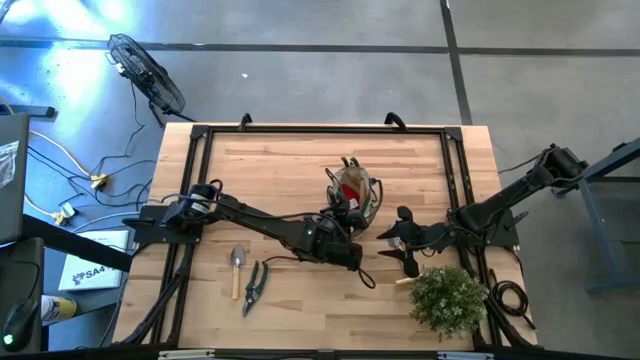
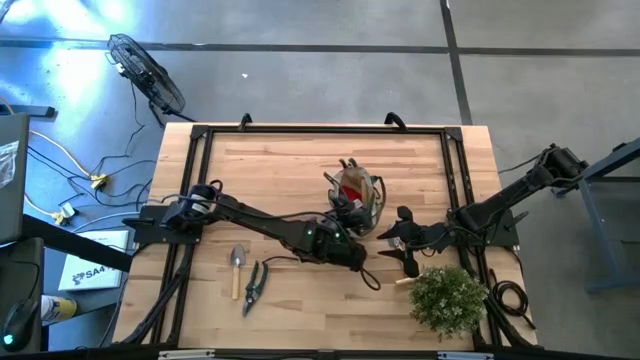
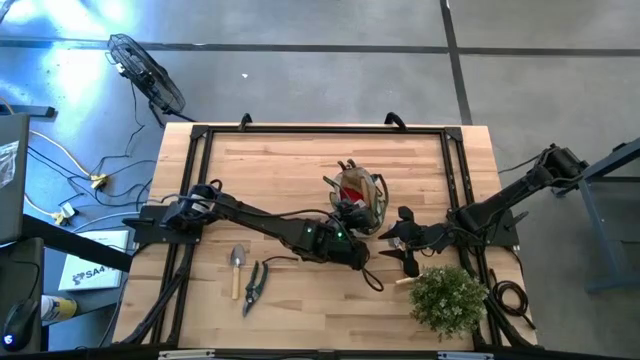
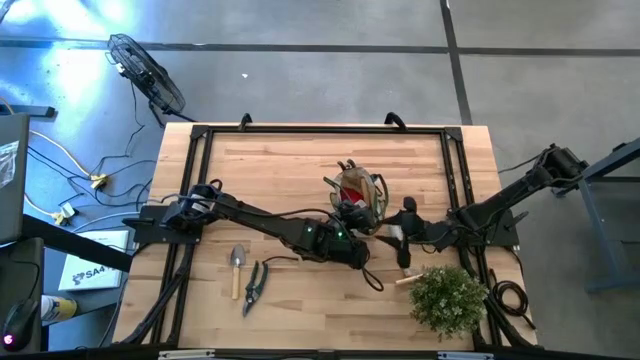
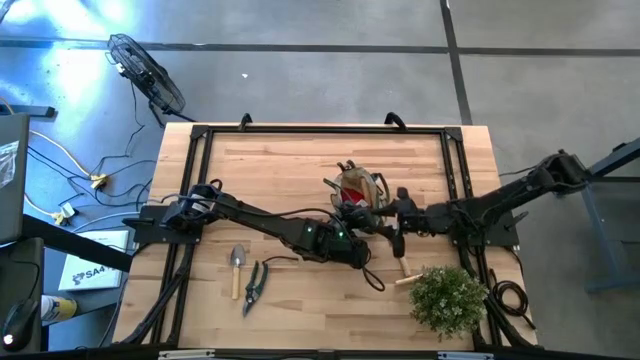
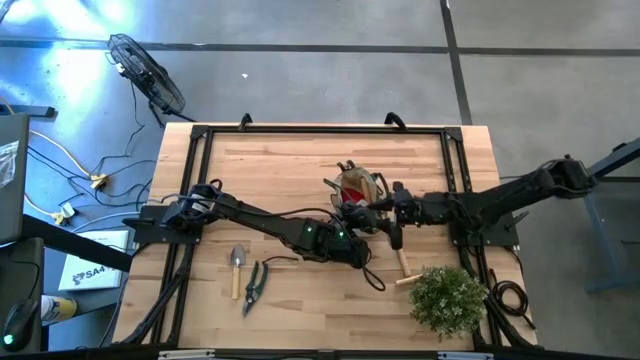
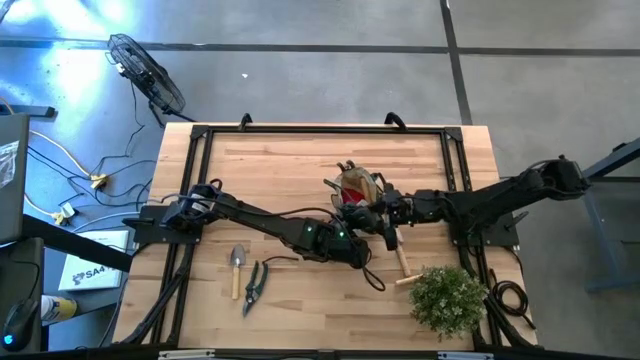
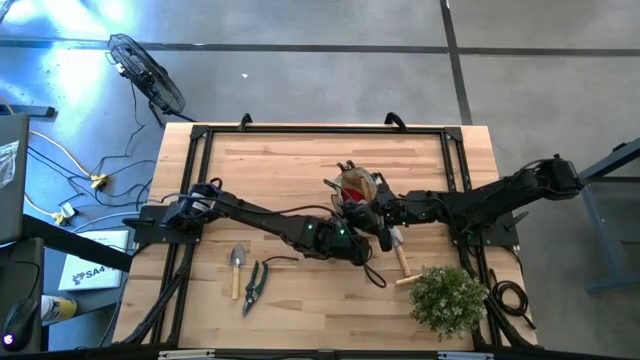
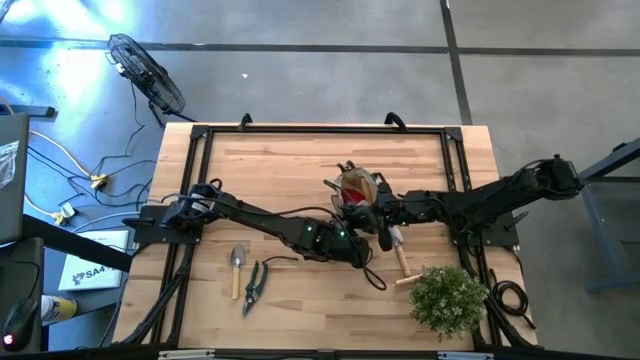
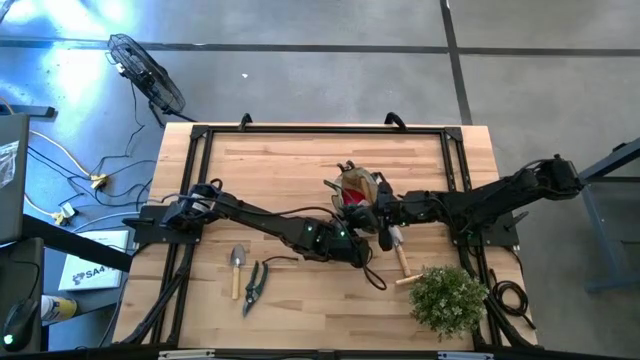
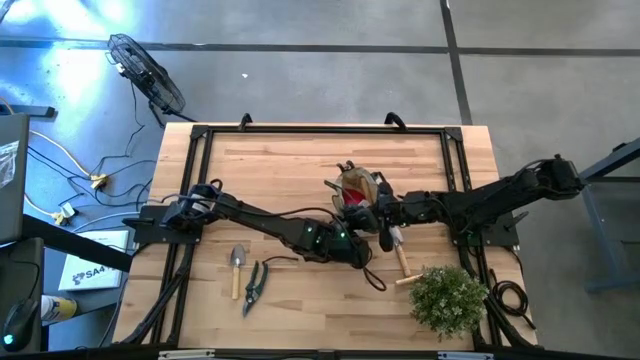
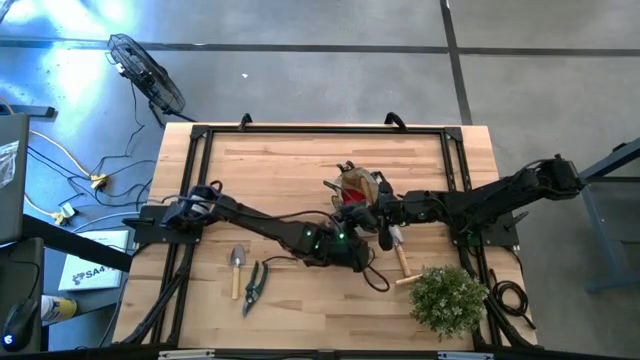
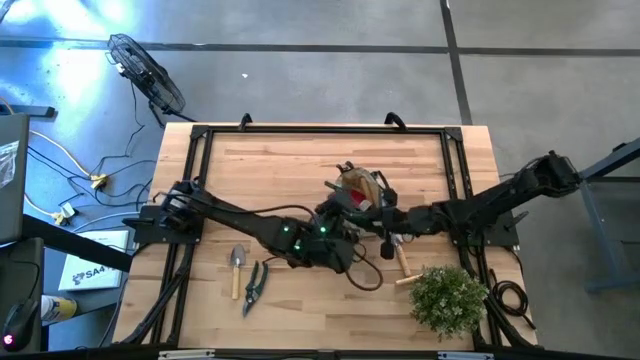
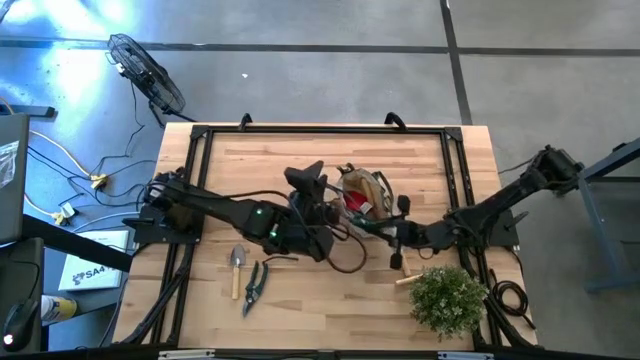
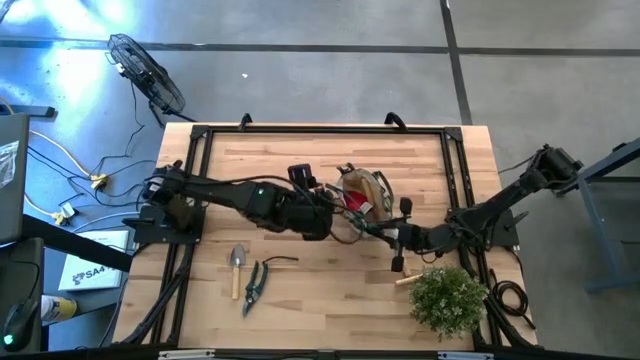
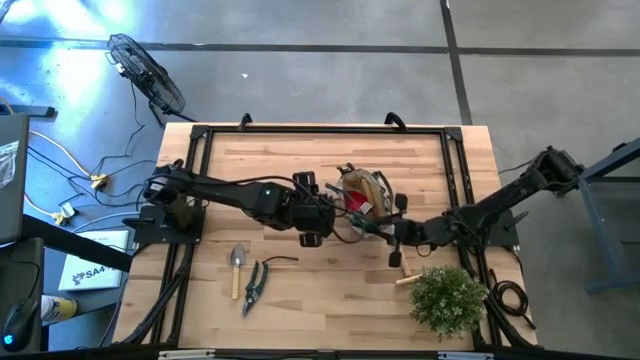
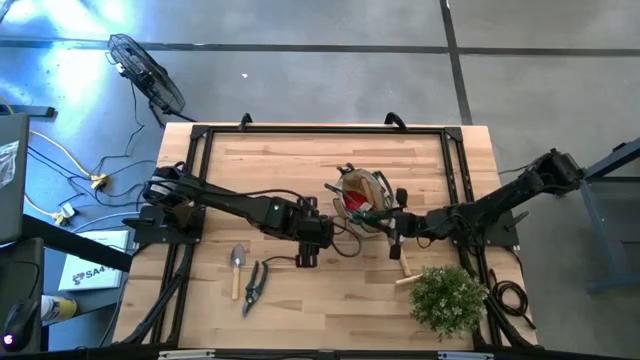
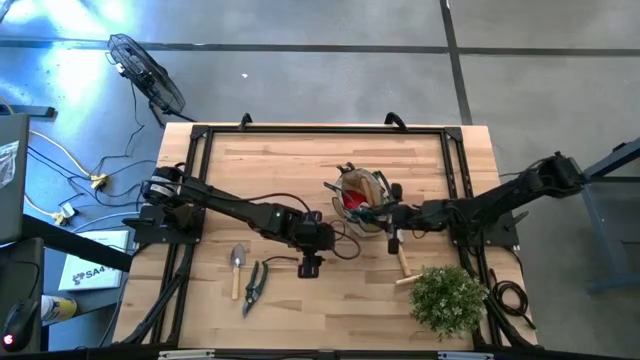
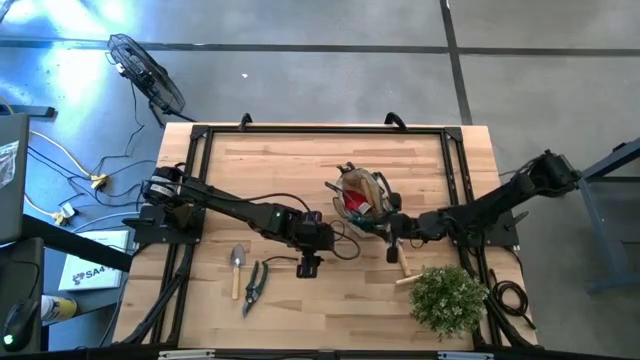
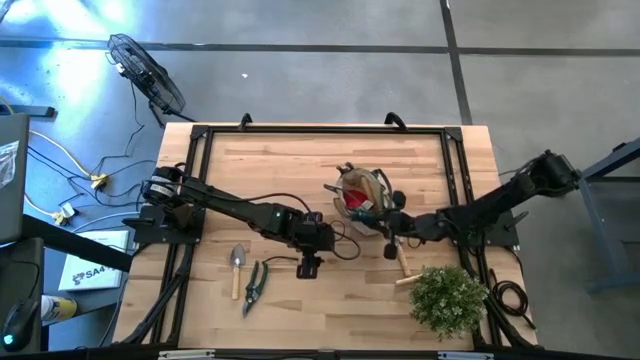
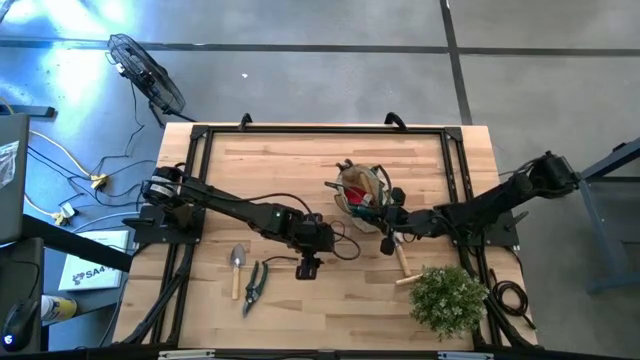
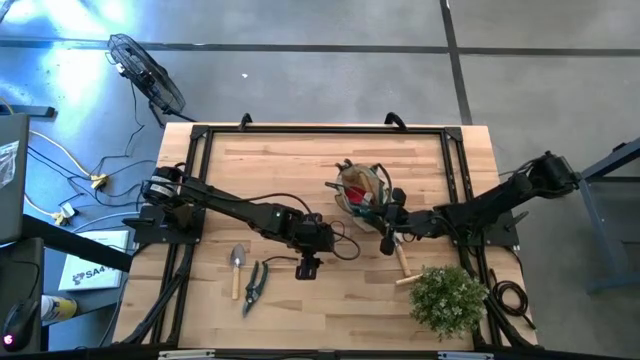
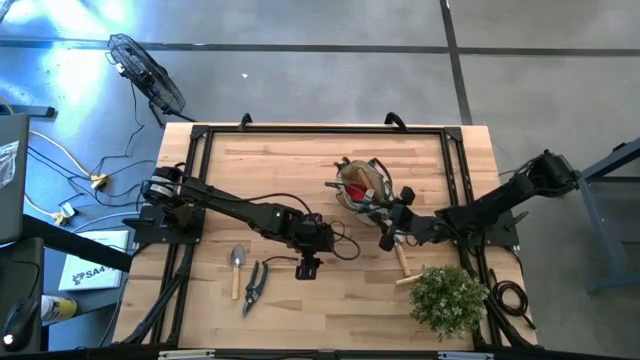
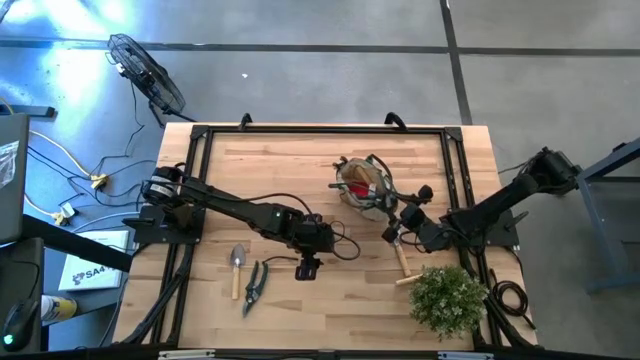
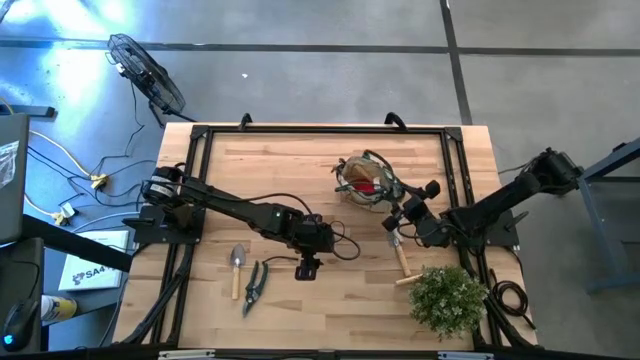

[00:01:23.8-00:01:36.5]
Task: Pick & Place Garden tools in Gardening bag
Put the top green shear scissors into the light brown gardening bag

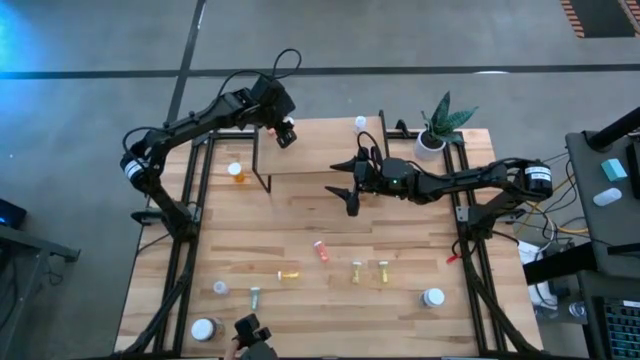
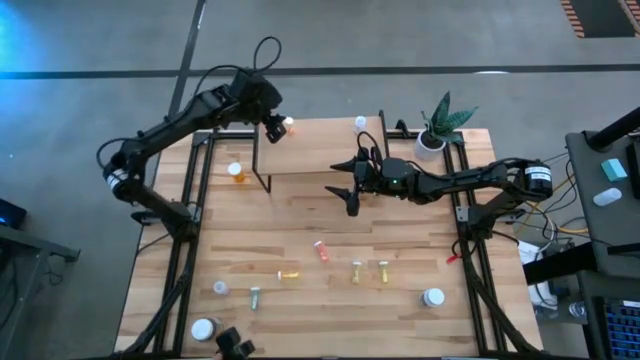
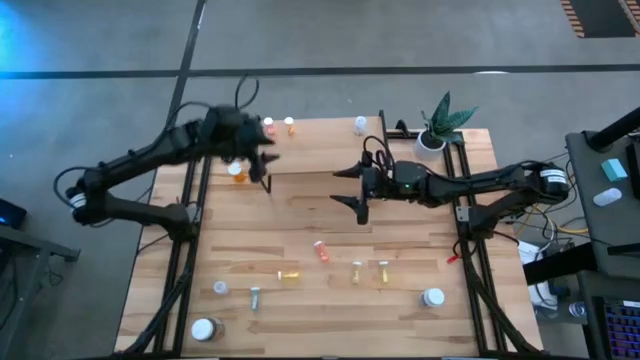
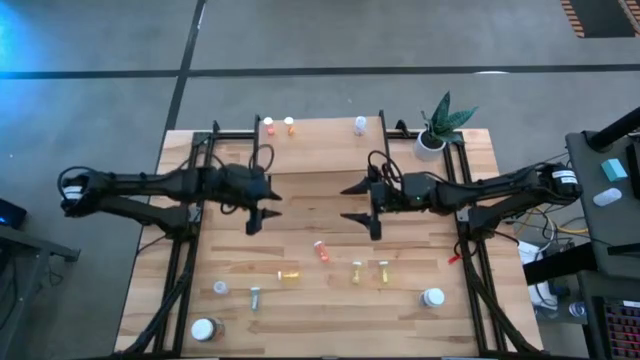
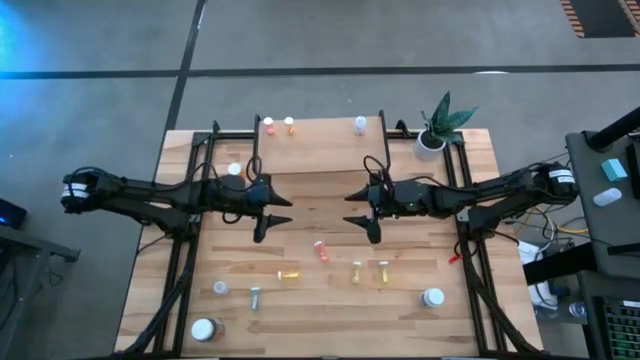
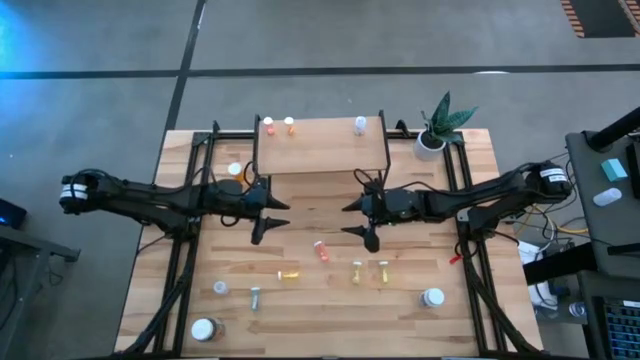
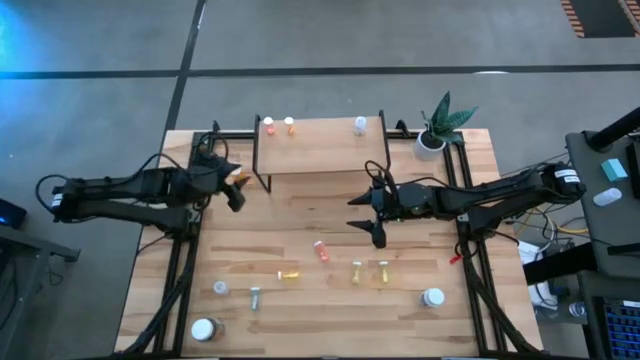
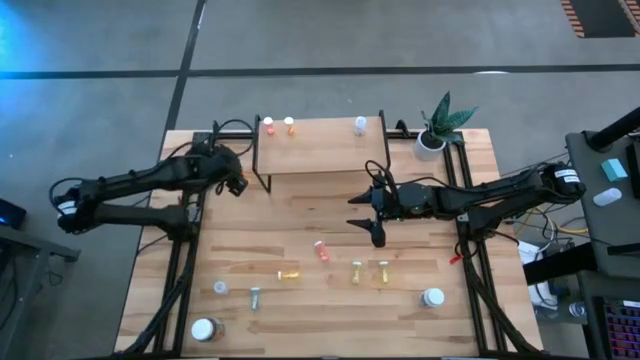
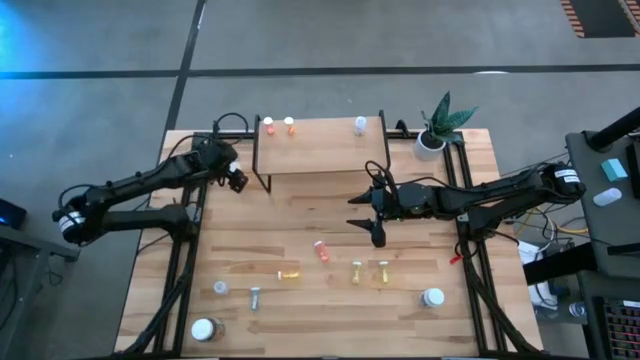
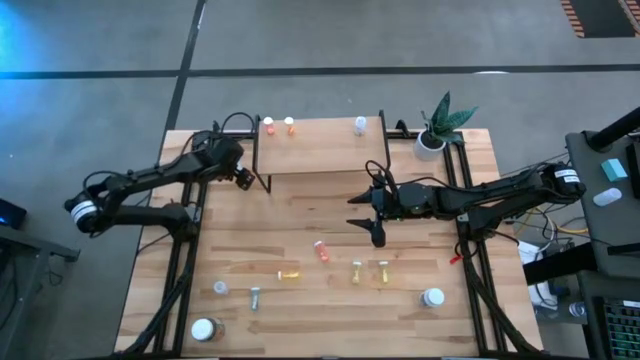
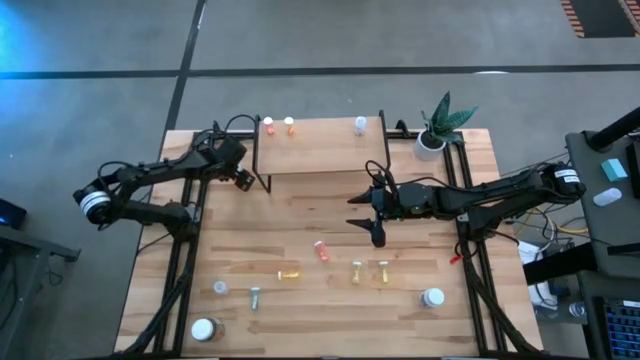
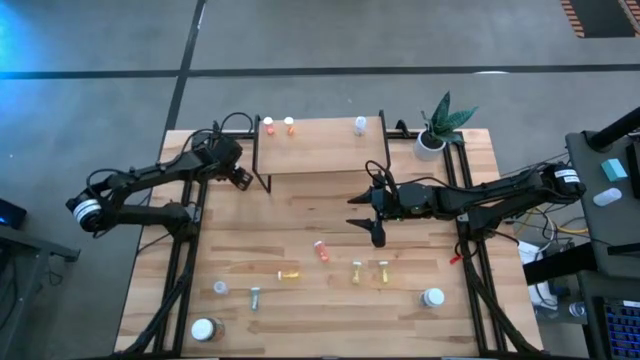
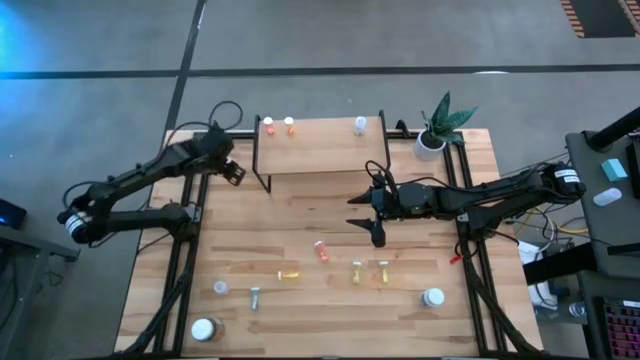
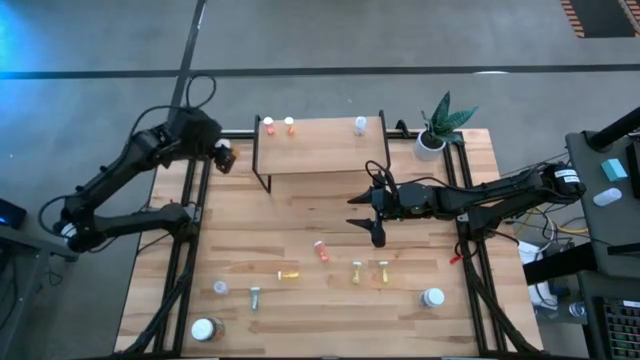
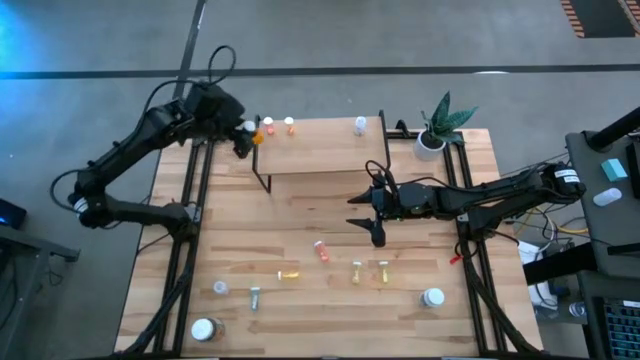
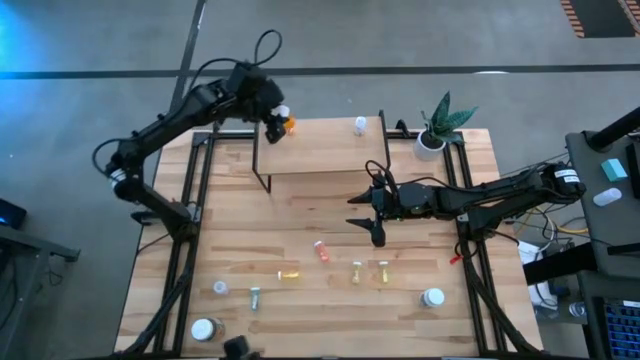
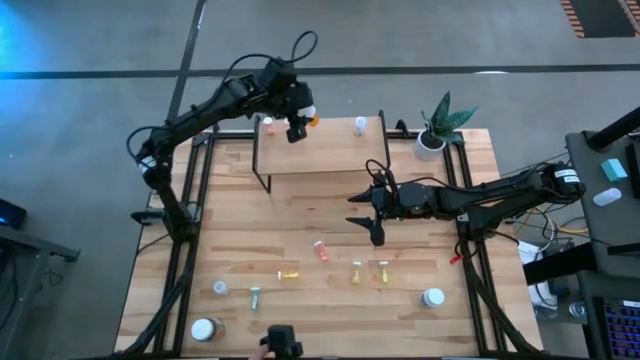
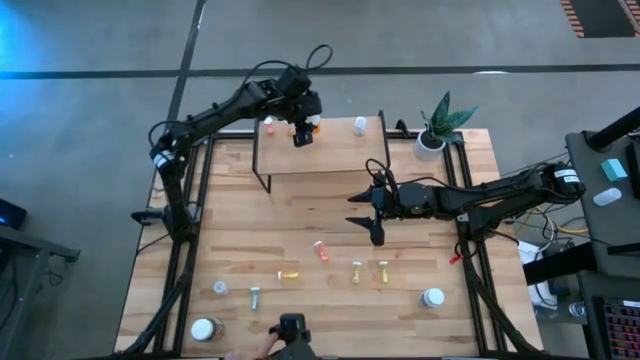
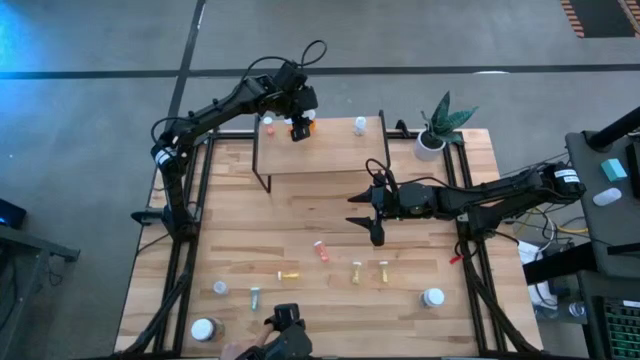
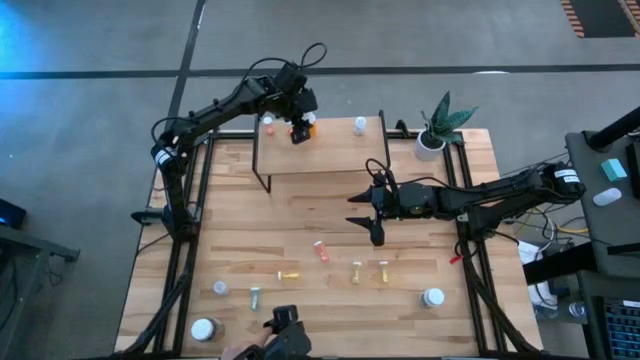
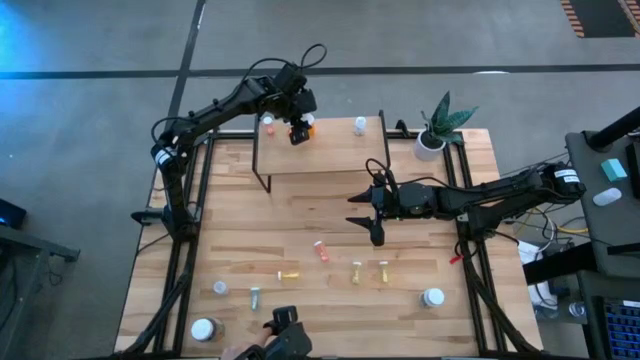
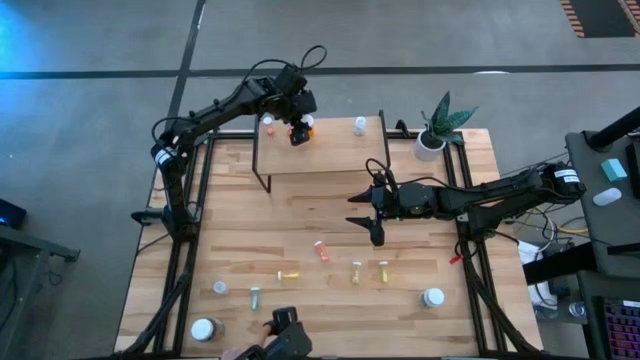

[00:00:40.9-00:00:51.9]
Task: Pick and place medicine bottles onto shelf by color
Put the orange pill bottle on the shelf
